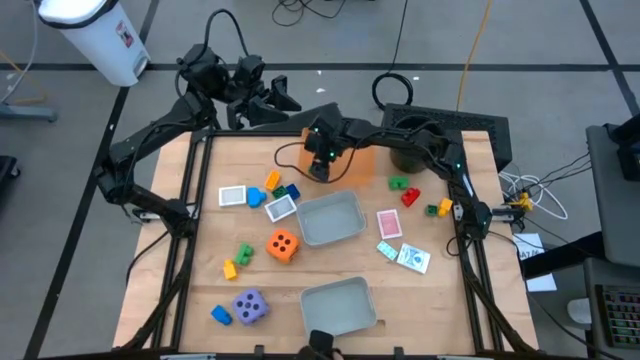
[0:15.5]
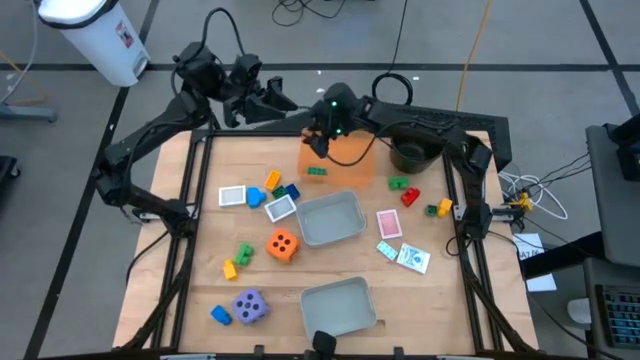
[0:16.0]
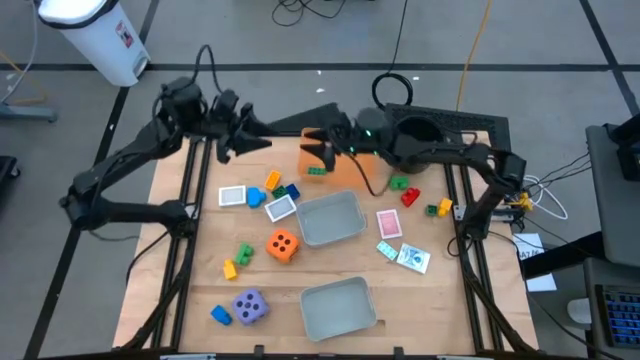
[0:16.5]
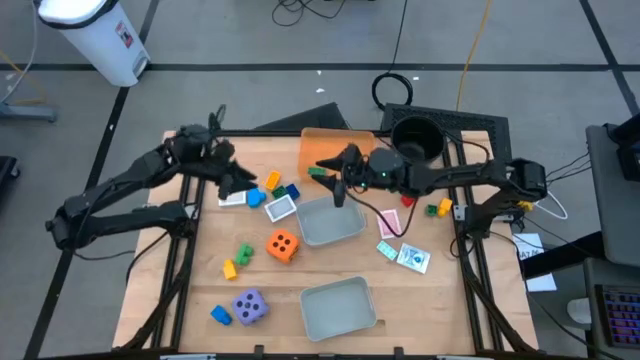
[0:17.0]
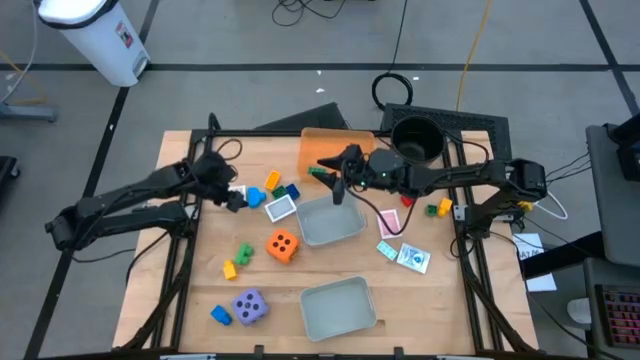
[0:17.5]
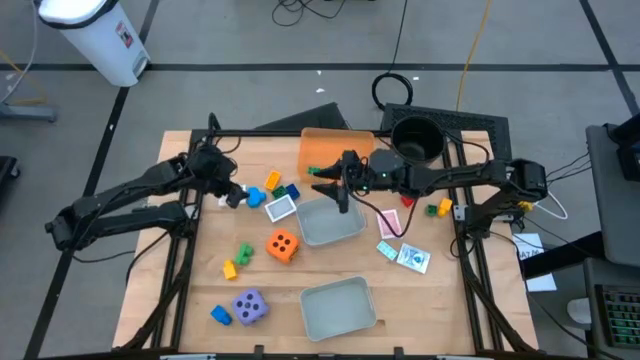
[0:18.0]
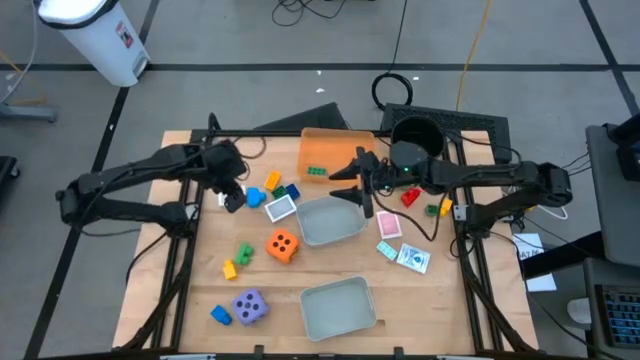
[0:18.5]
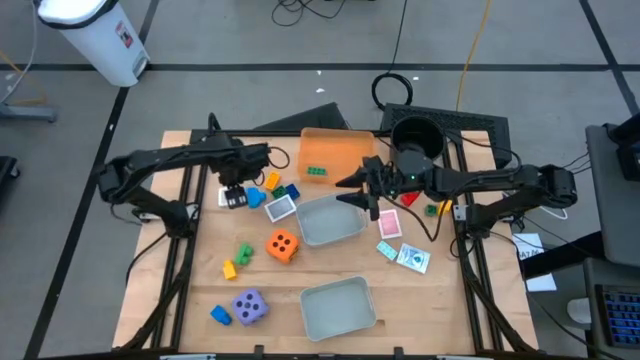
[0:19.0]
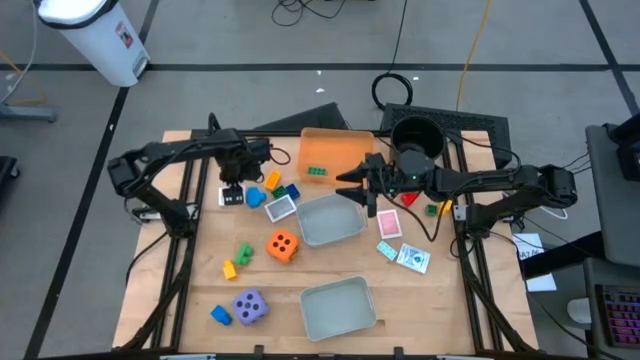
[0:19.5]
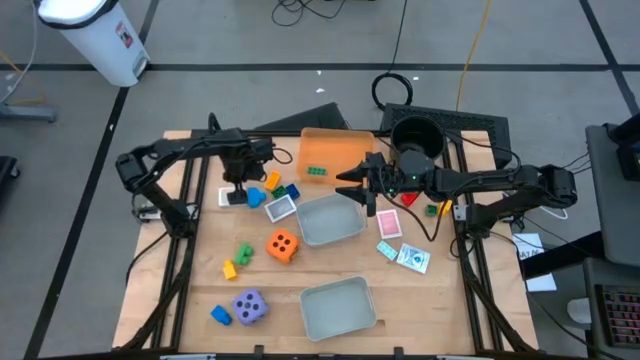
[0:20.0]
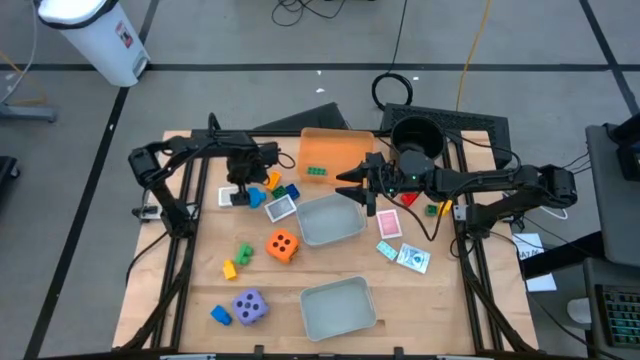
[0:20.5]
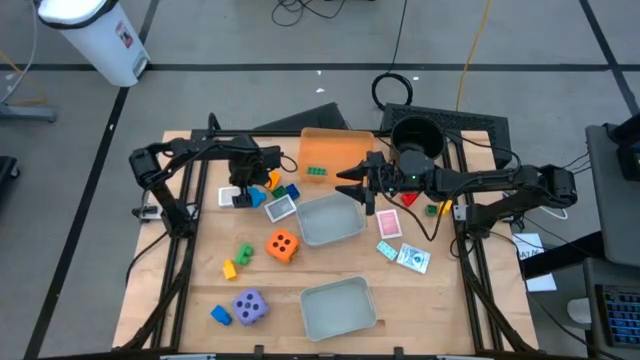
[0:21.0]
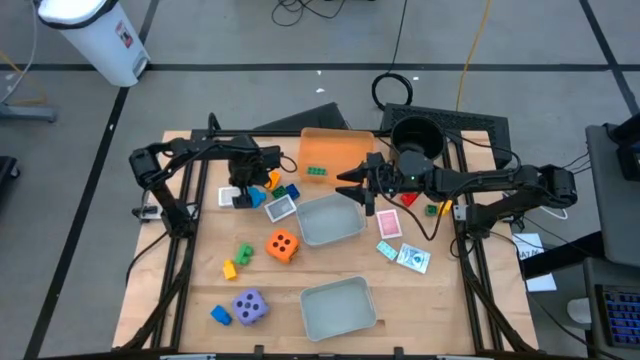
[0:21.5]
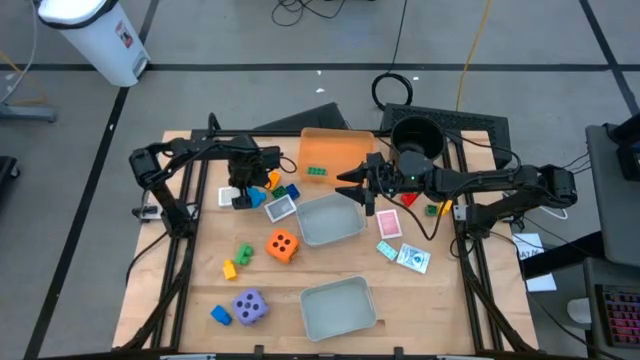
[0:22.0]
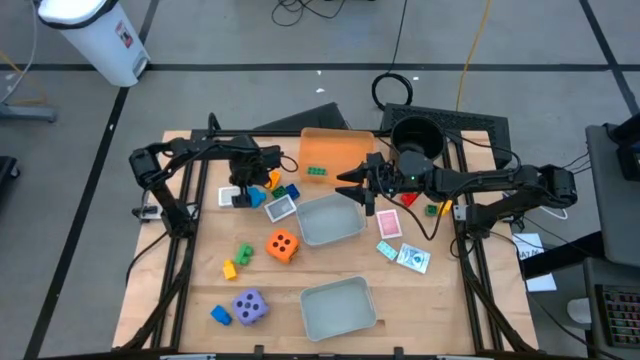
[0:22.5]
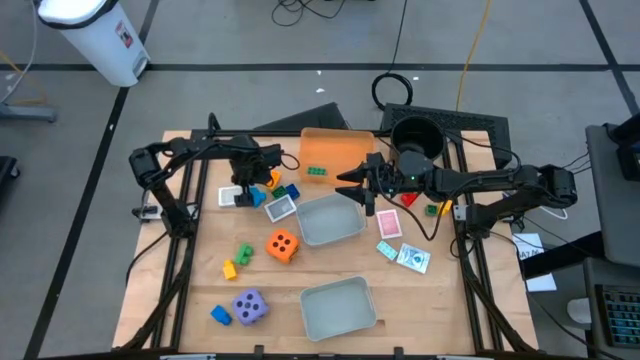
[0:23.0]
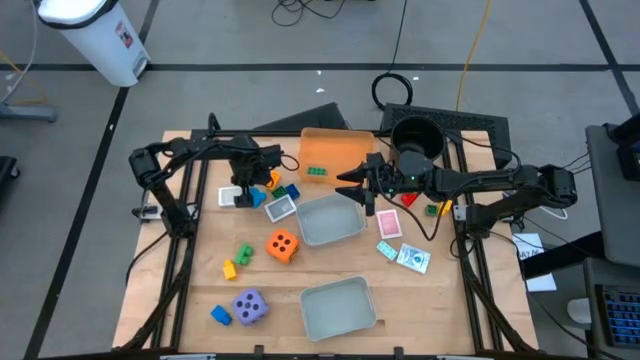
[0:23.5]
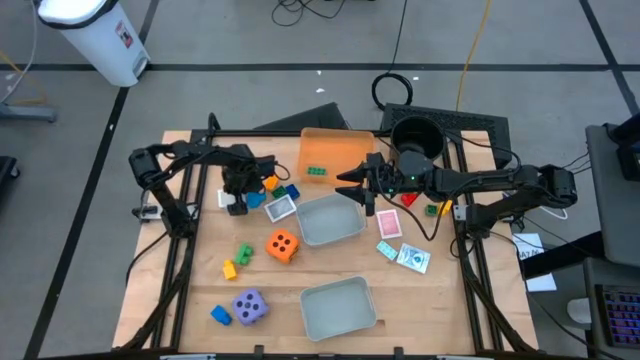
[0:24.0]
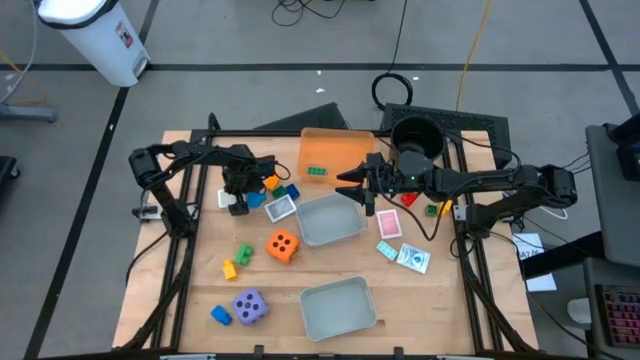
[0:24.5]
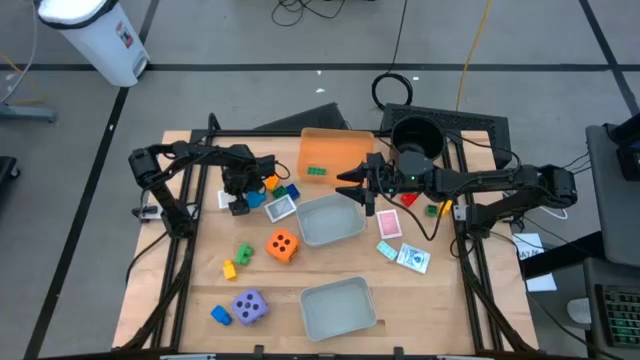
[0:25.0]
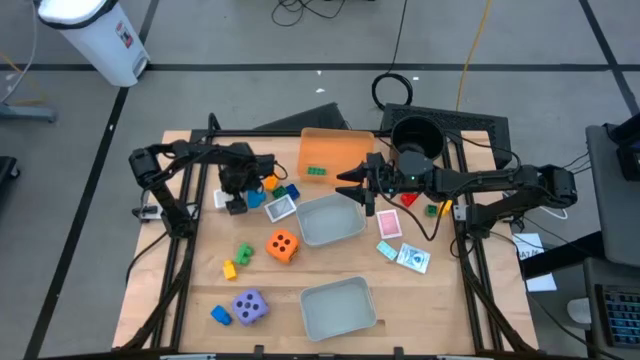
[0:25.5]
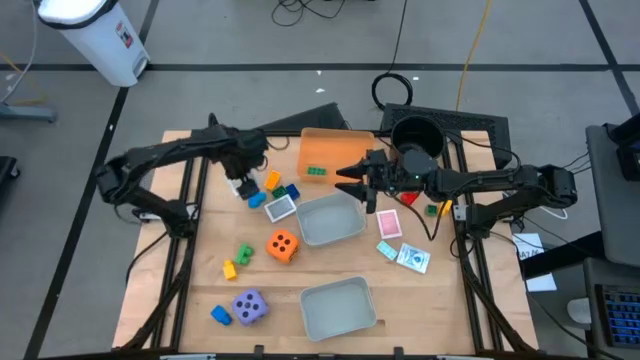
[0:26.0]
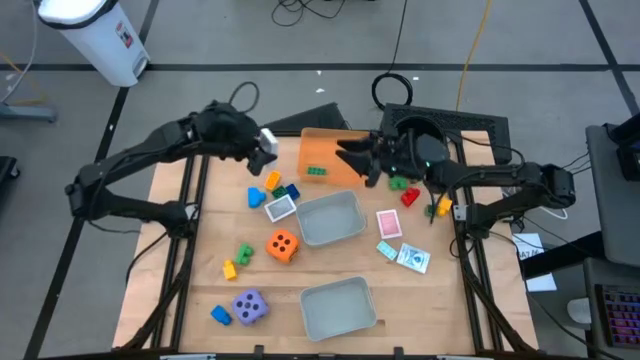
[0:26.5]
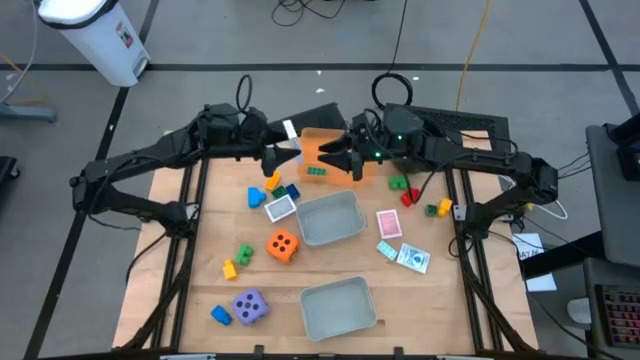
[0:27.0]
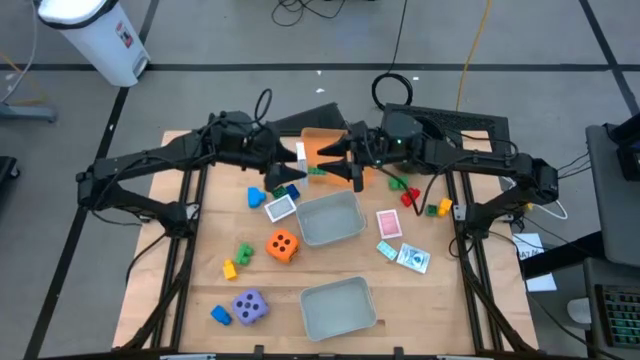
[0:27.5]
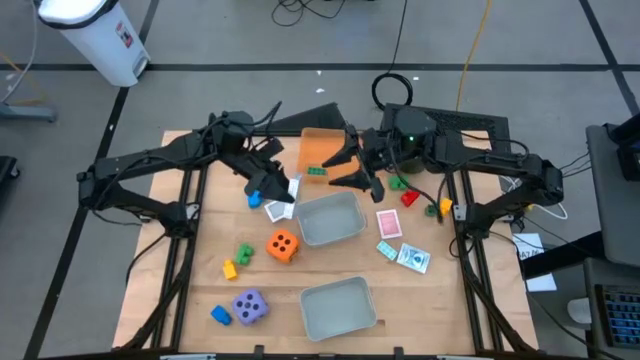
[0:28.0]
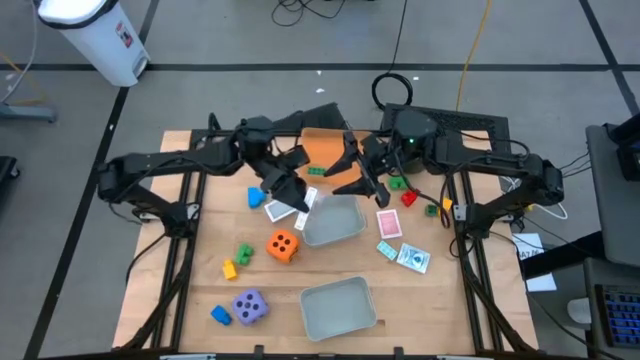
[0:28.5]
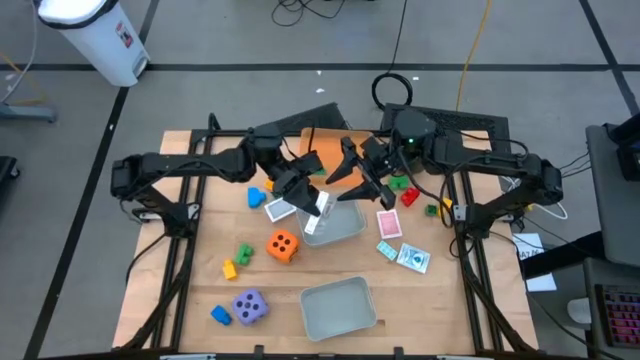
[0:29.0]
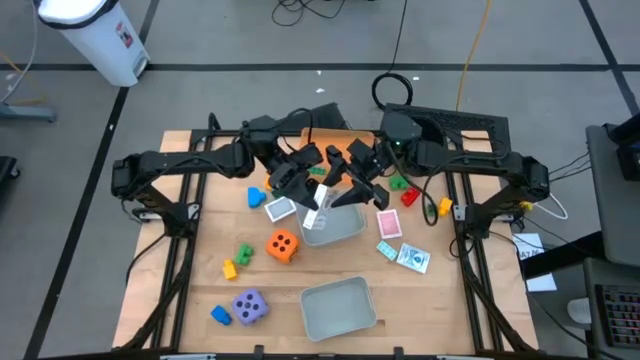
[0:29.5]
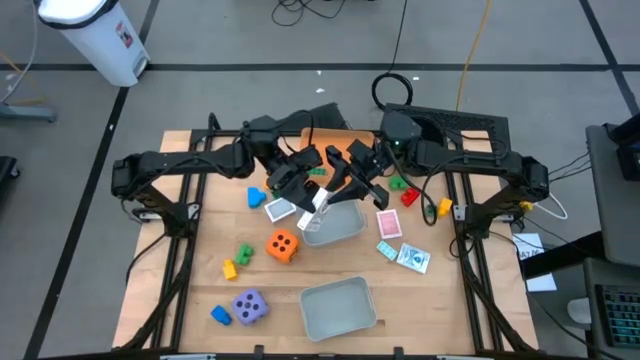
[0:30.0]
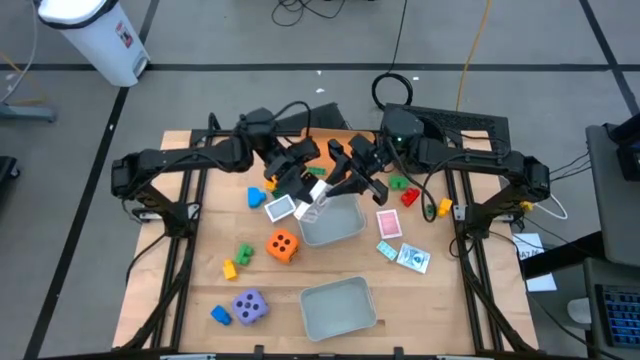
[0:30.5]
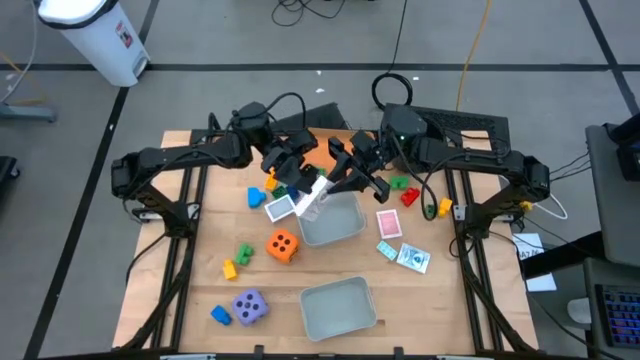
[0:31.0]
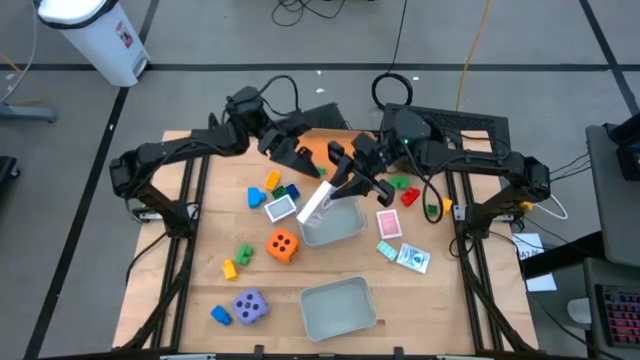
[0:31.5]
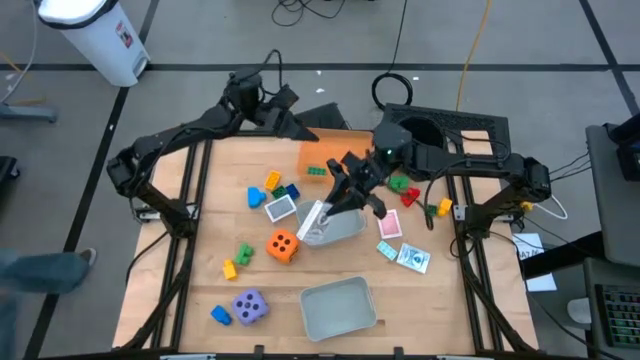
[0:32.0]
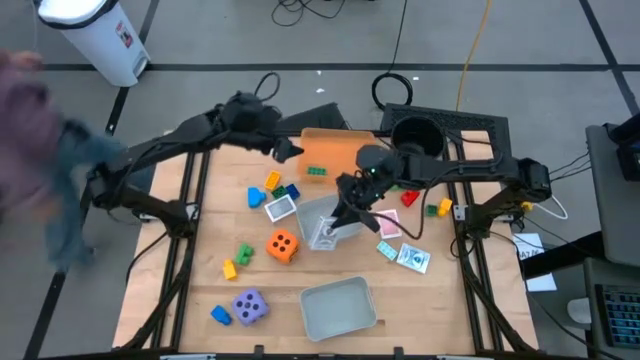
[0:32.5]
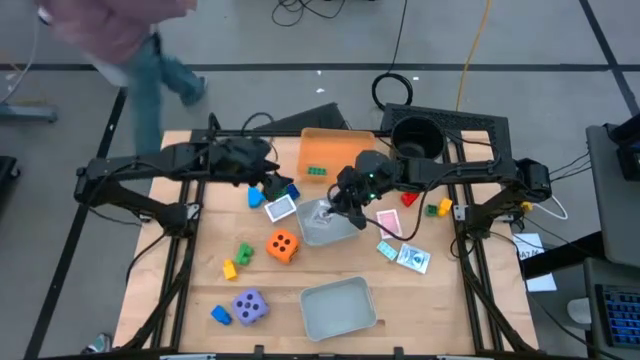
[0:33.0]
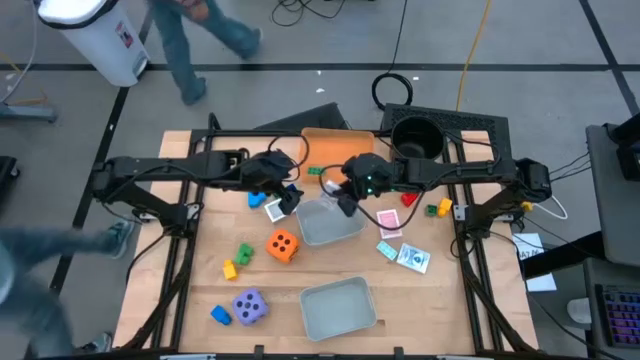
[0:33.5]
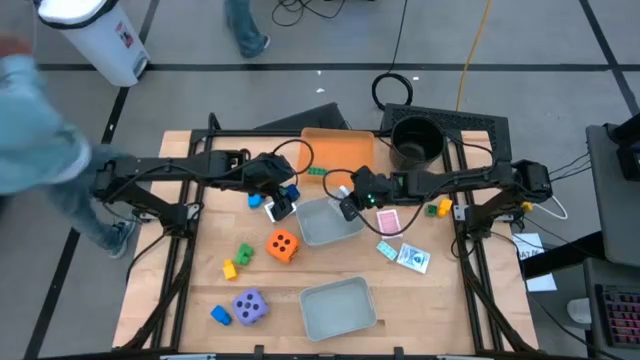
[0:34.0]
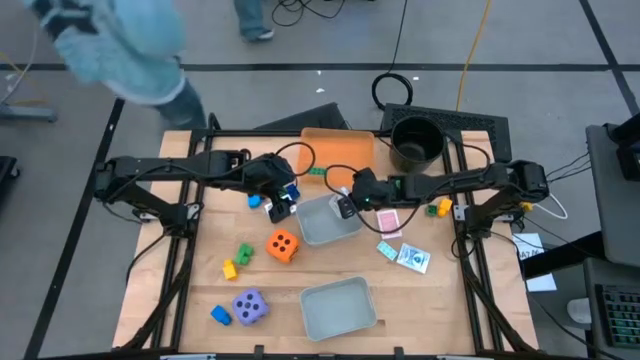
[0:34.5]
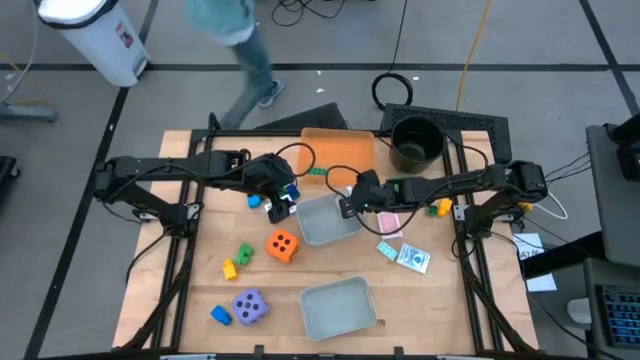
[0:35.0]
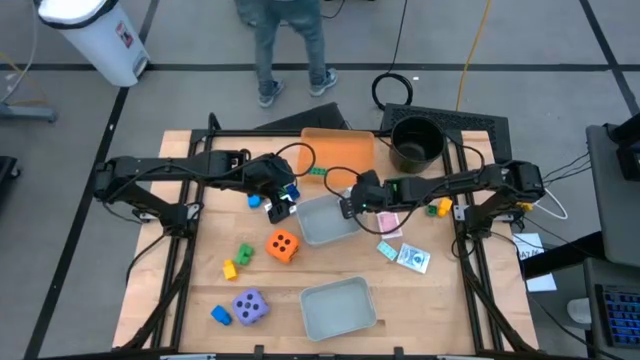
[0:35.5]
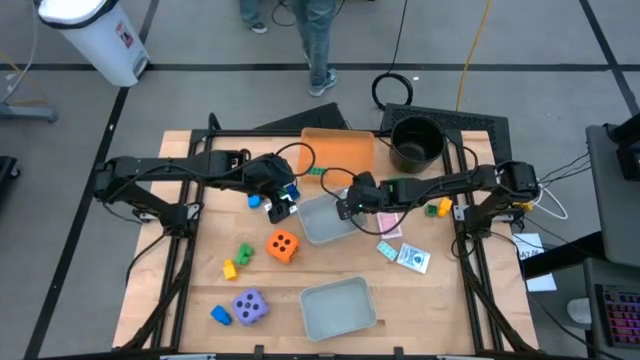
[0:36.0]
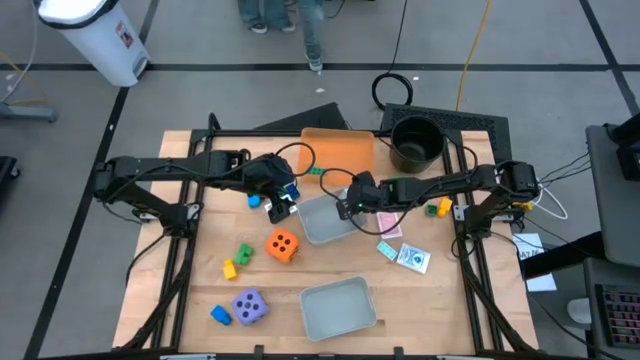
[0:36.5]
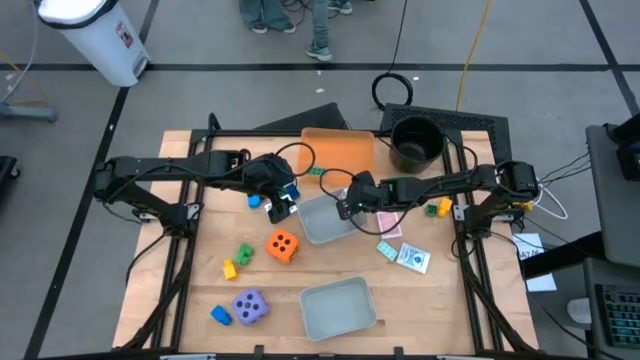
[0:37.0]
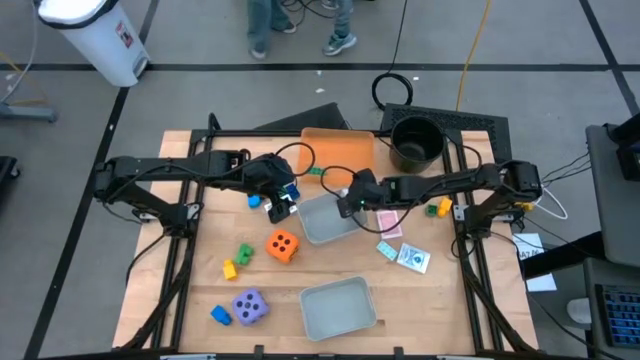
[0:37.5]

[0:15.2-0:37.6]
Task: Pick & Place Toys
Put the brown deck of cards into the top gray bin
